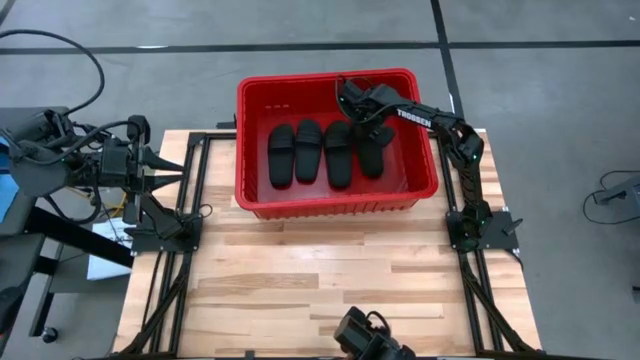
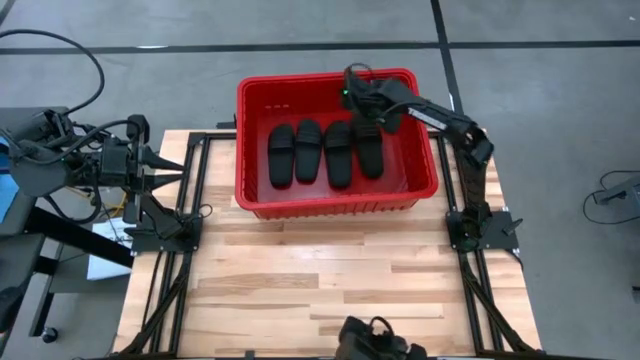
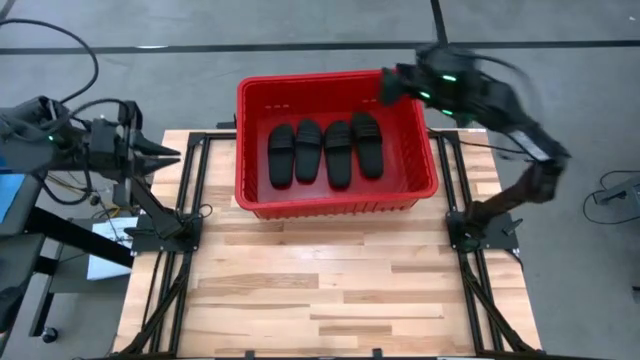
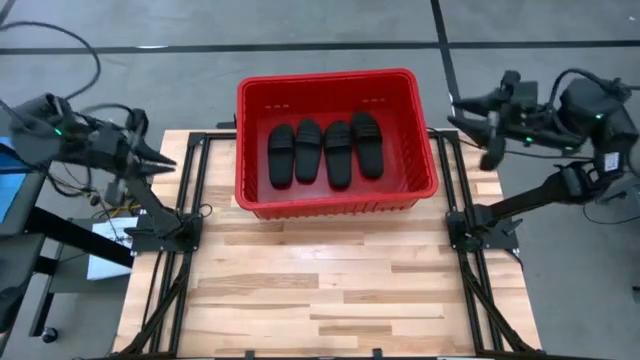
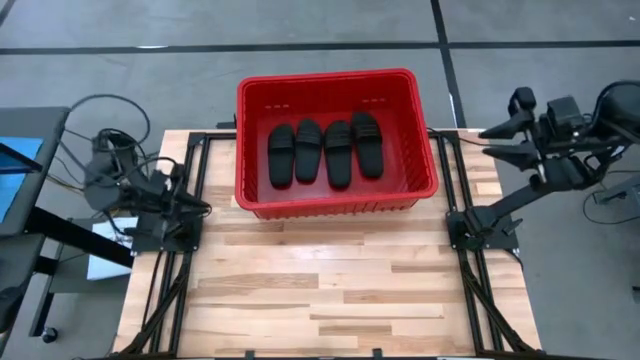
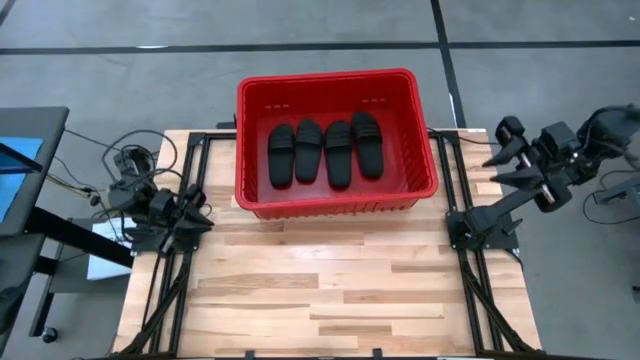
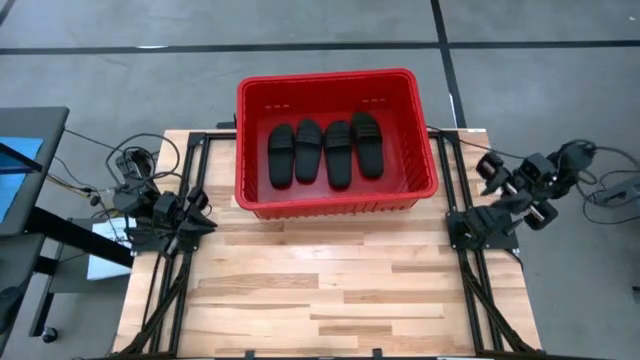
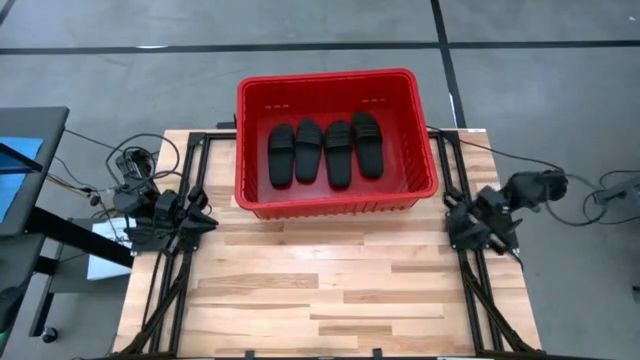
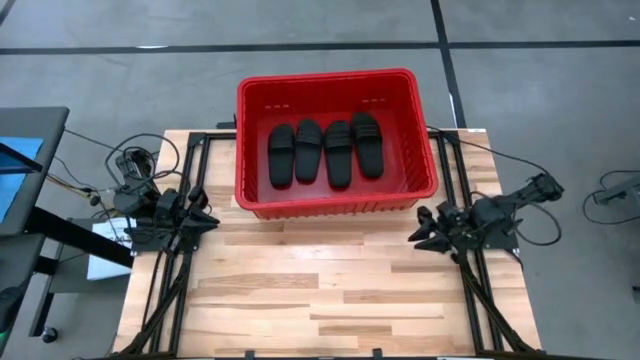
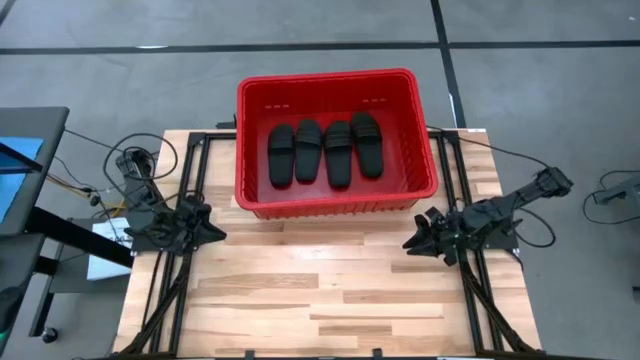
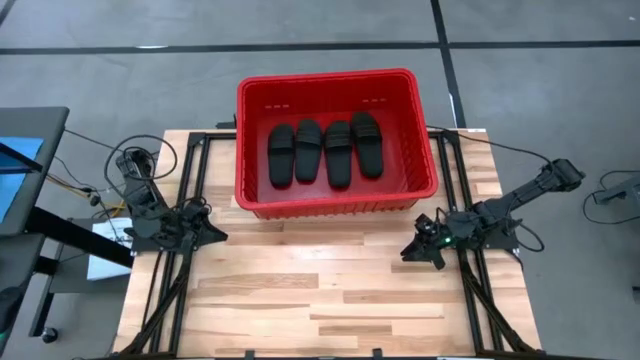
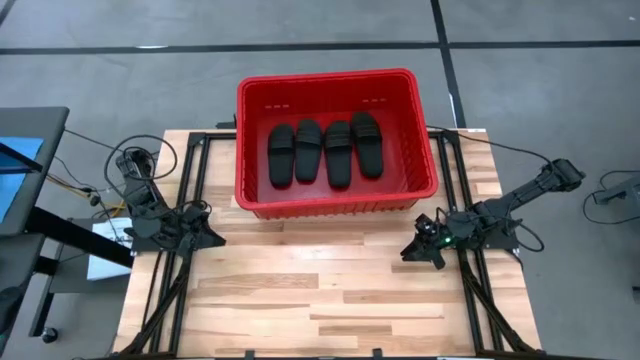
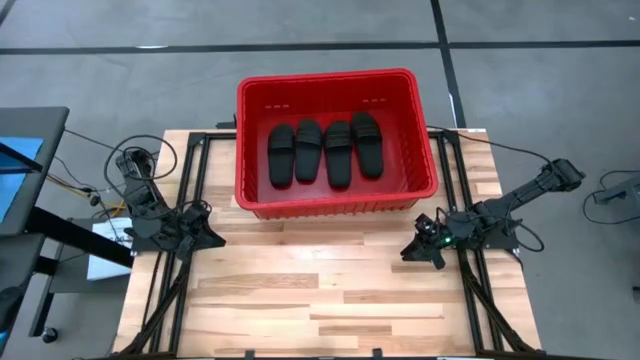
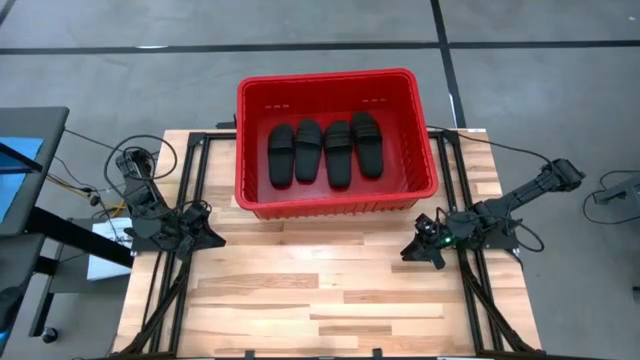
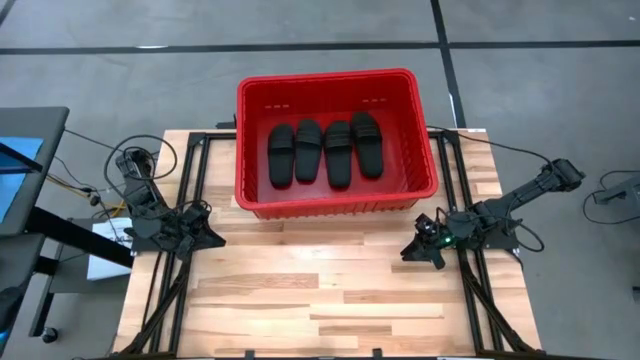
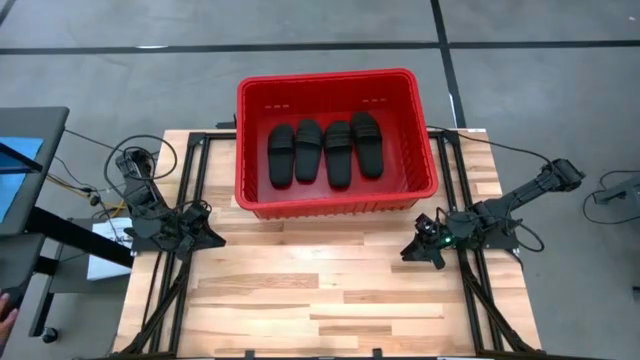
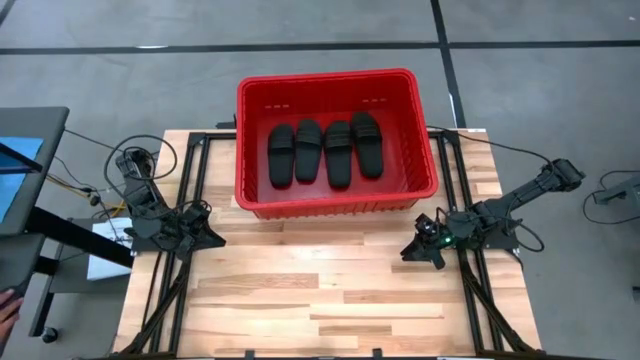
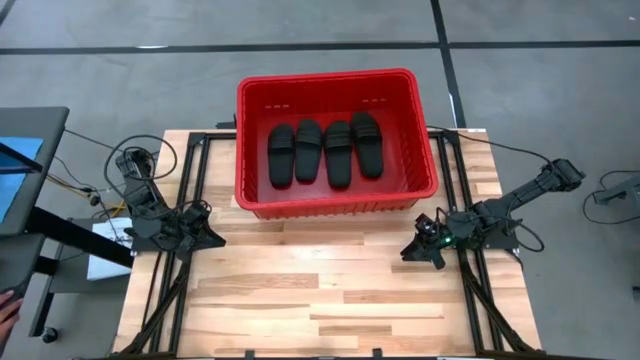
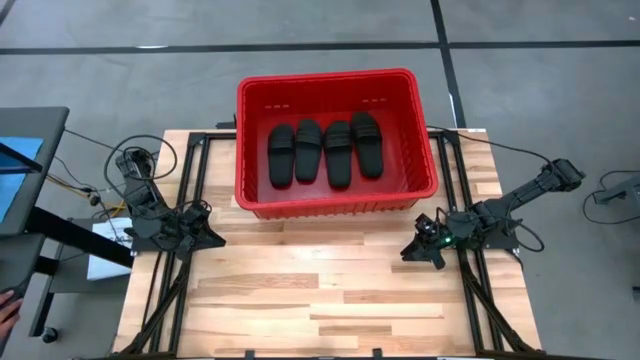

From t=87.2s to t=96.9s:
Task: Pick and place slides into bin
Return to Home Position

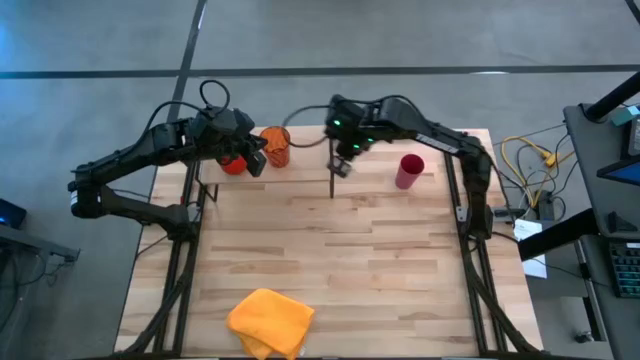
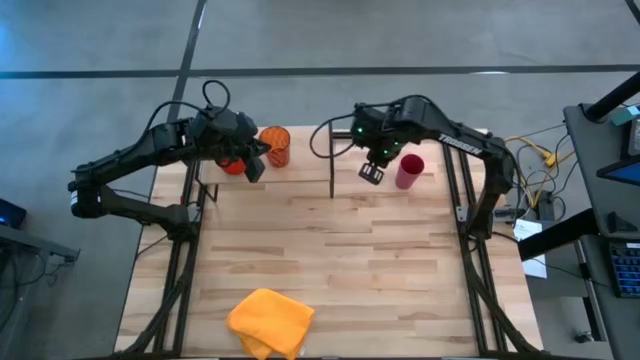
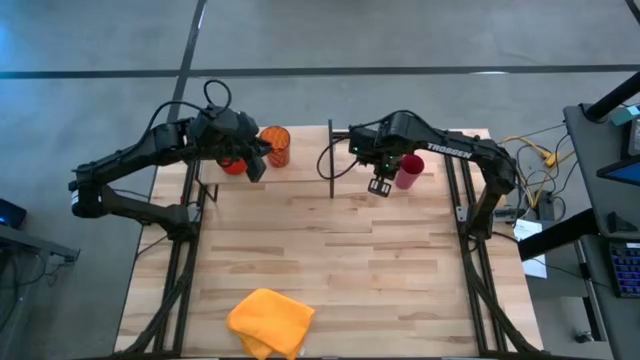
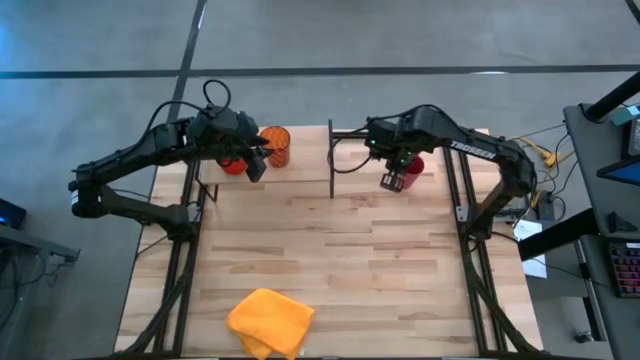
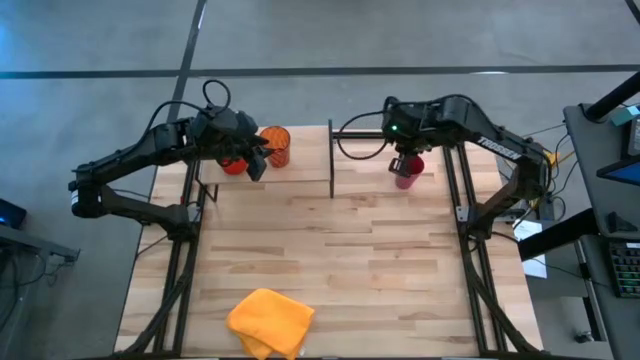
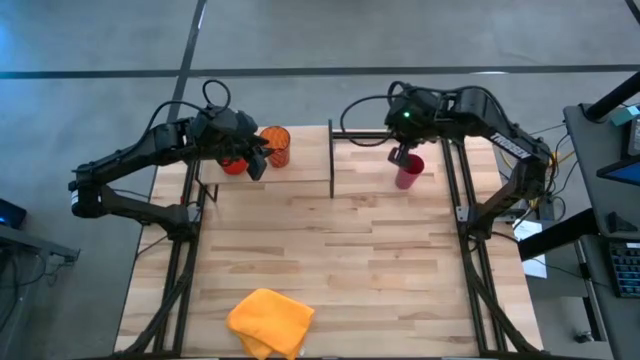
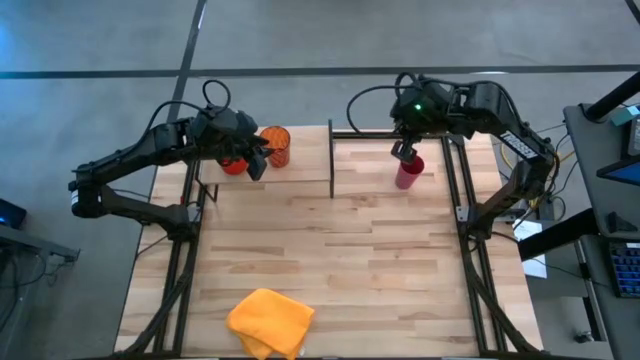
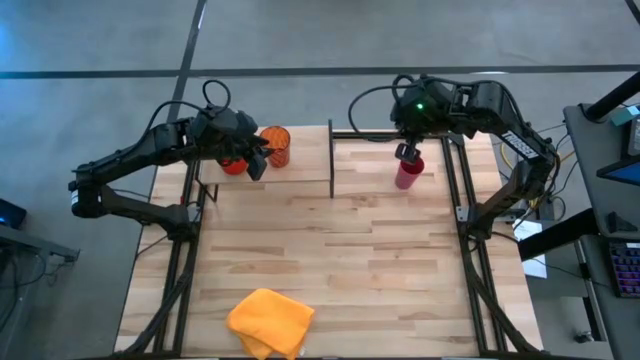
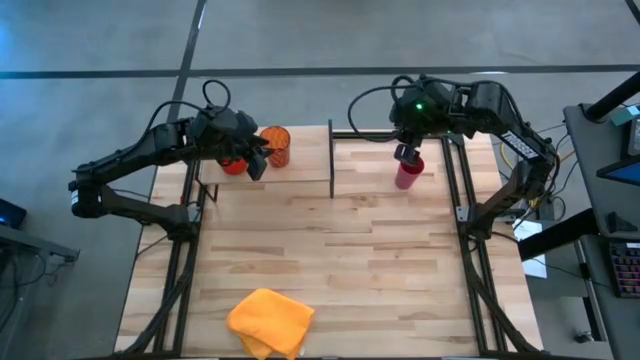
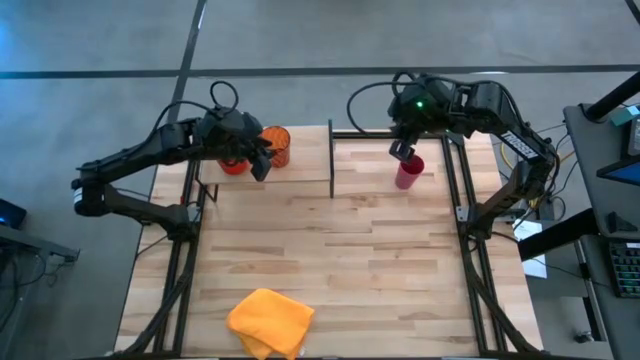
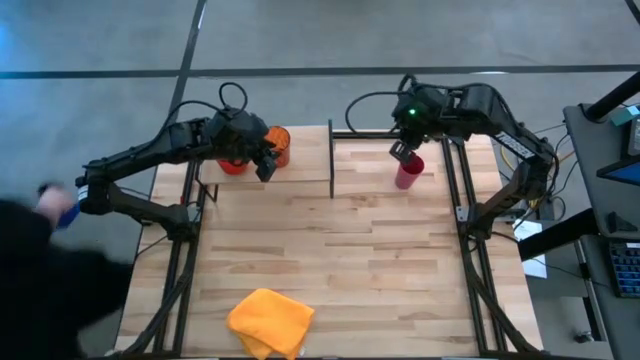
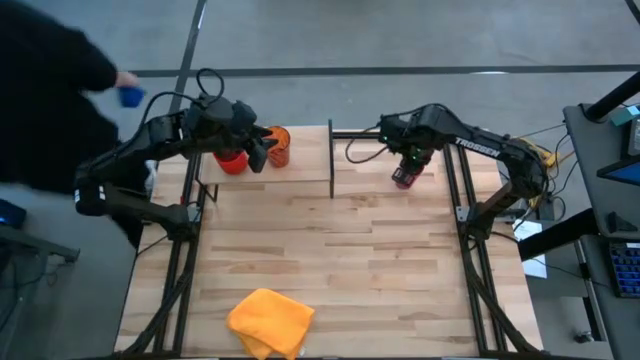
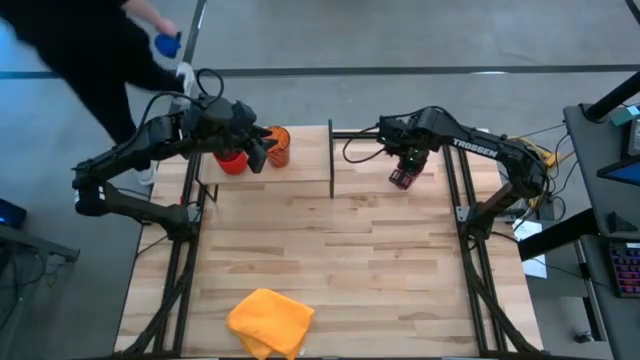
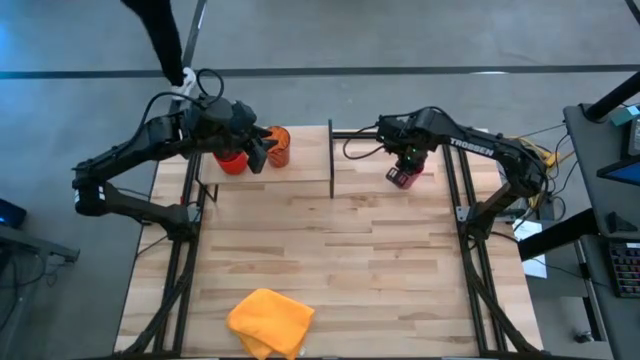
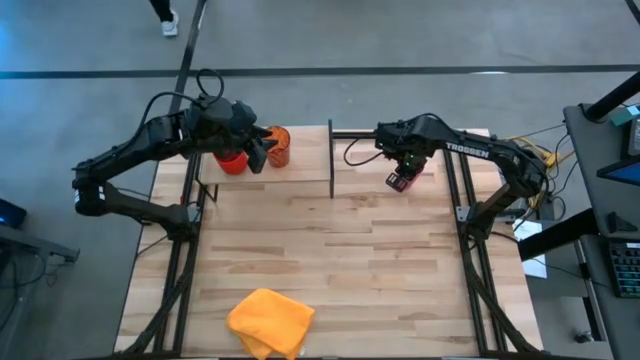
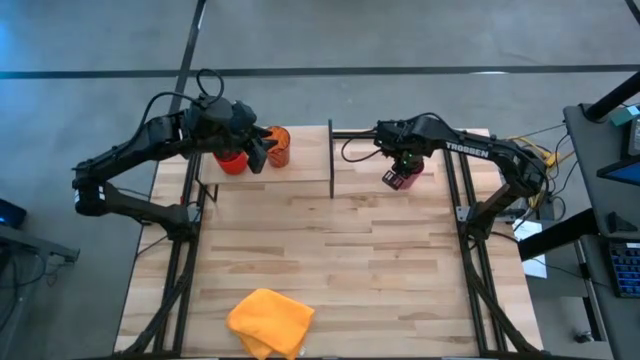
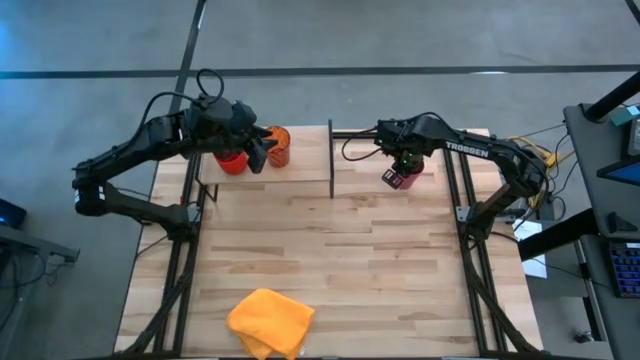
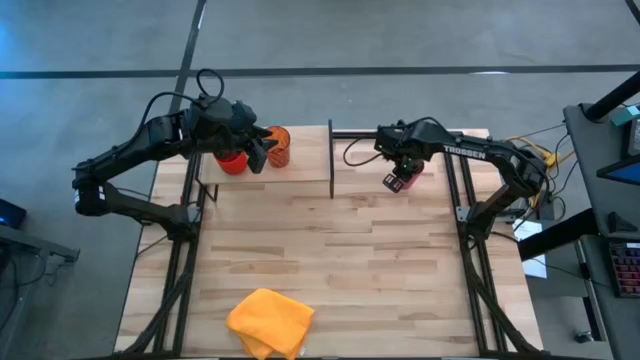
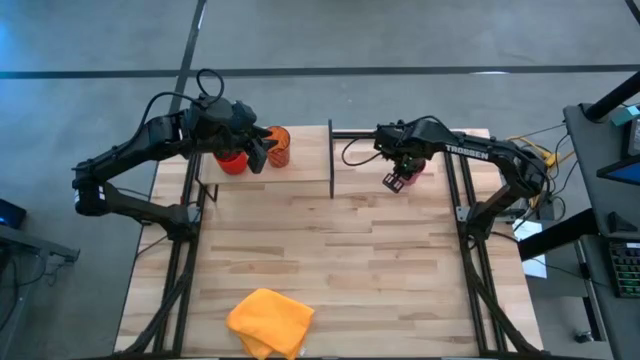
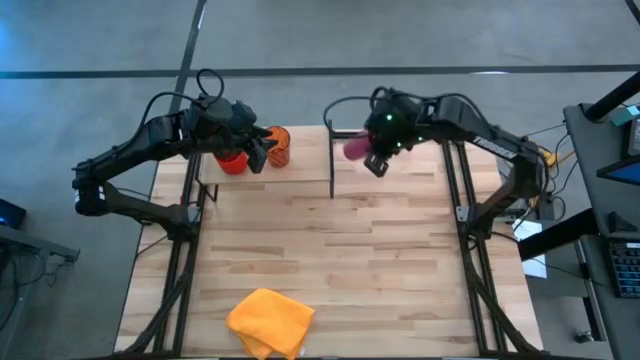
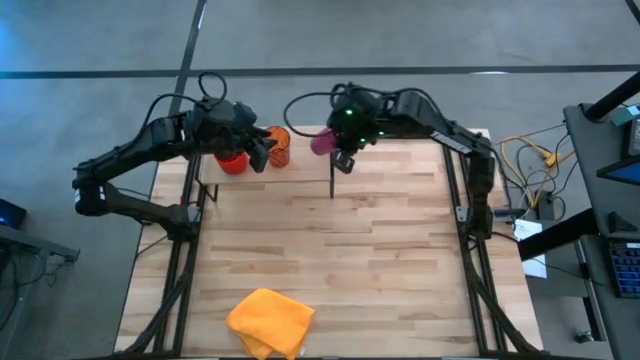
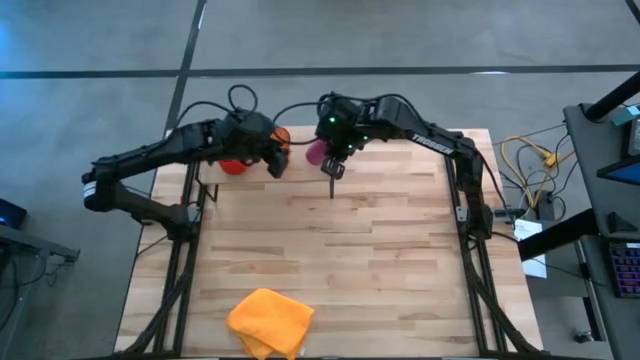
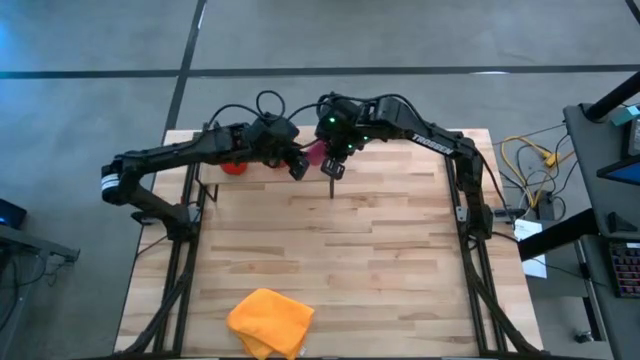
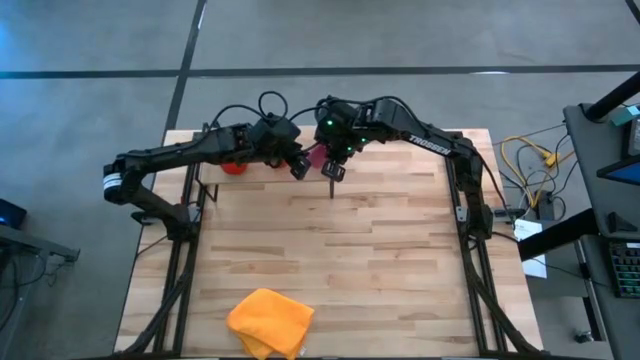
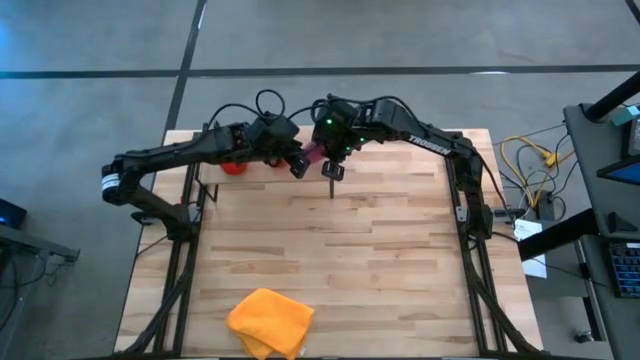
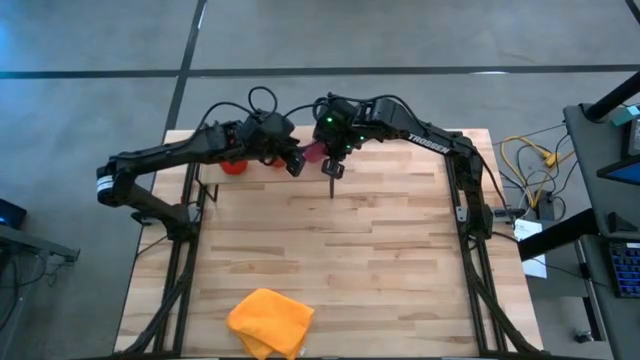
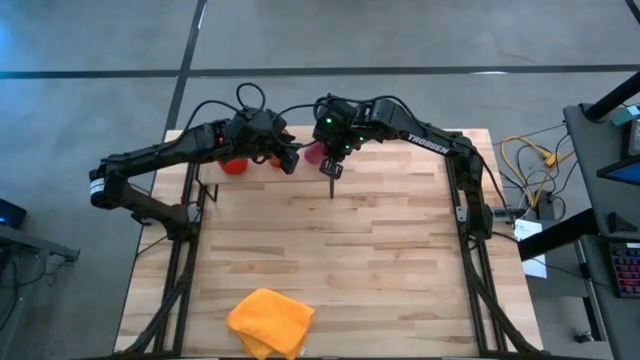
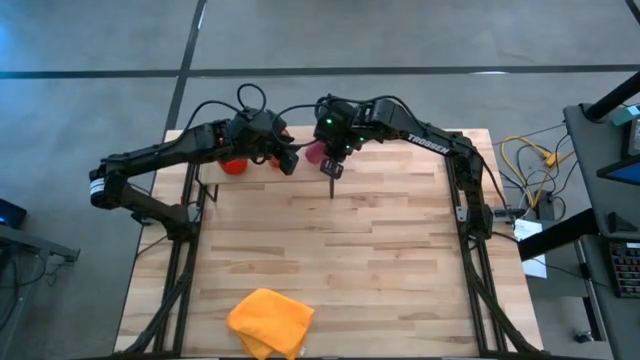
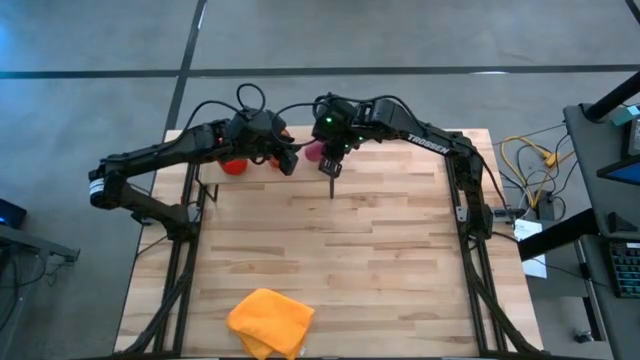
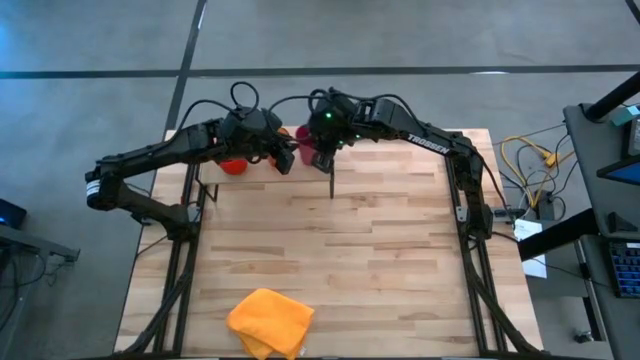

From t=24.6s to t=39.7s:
Task: Stack small to large cups/mugs on shelf
Put the pink cup on the shelf
